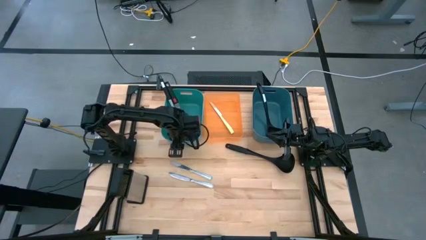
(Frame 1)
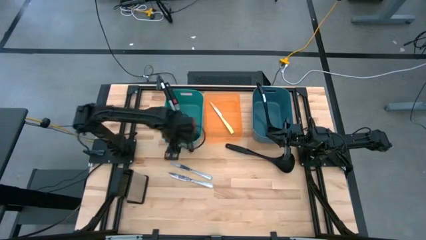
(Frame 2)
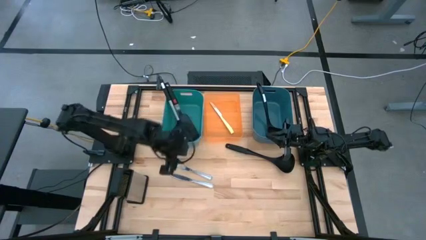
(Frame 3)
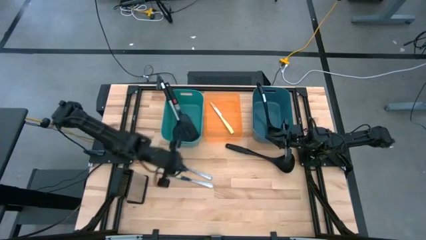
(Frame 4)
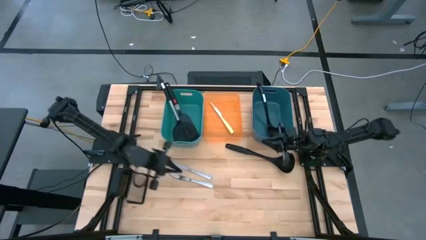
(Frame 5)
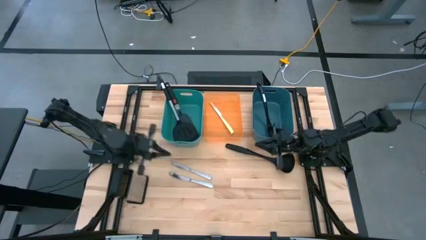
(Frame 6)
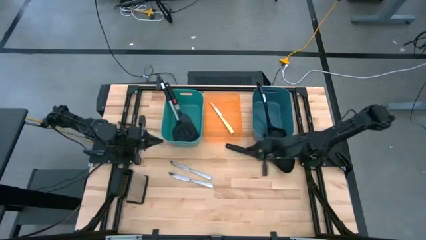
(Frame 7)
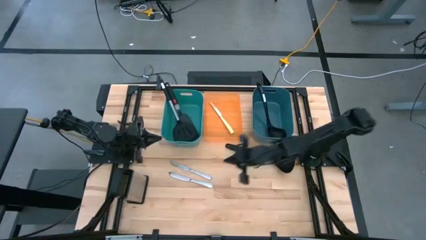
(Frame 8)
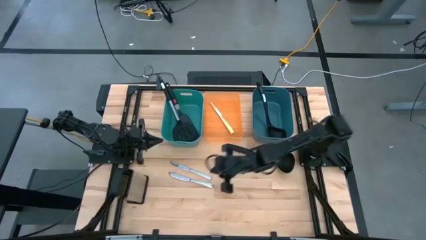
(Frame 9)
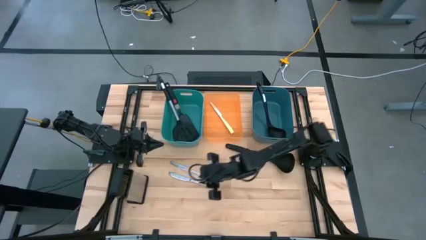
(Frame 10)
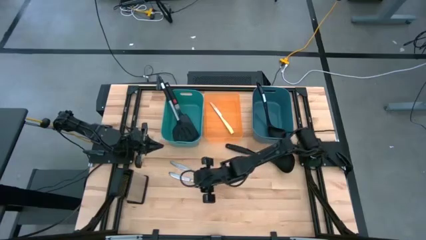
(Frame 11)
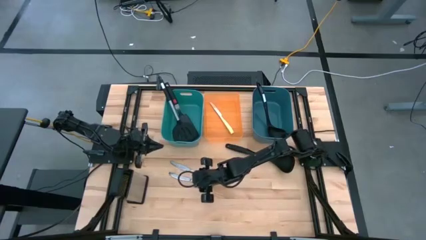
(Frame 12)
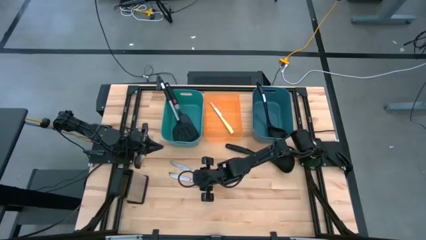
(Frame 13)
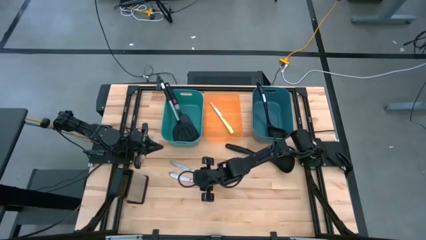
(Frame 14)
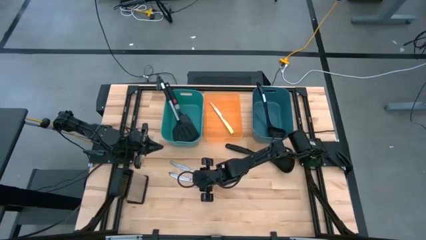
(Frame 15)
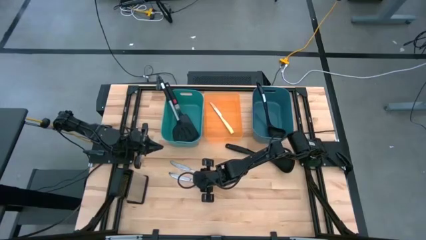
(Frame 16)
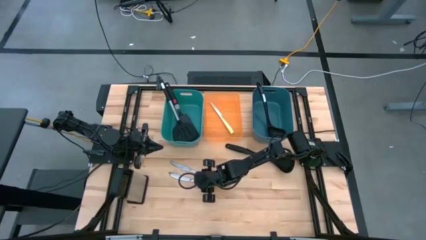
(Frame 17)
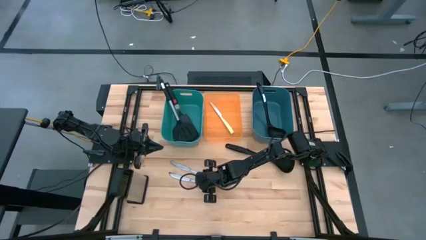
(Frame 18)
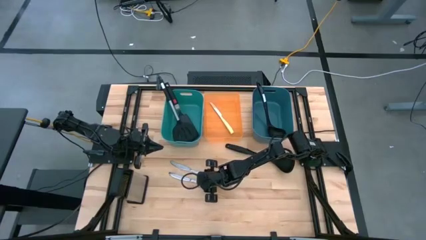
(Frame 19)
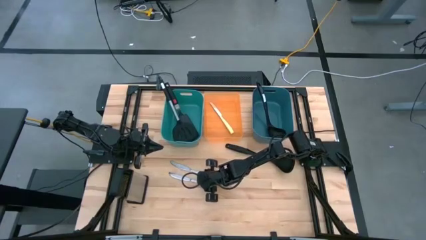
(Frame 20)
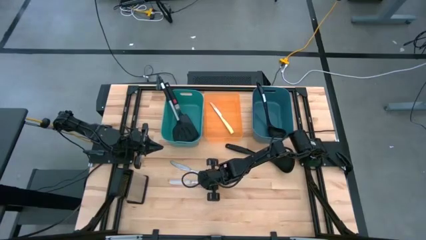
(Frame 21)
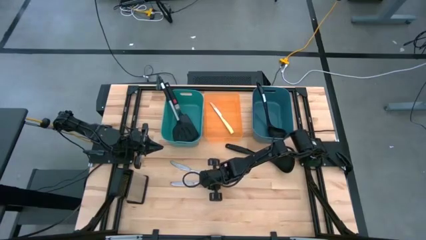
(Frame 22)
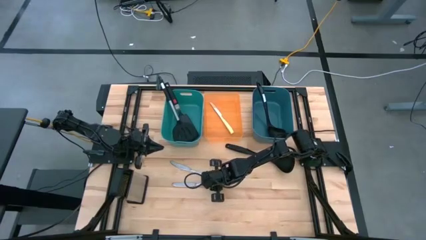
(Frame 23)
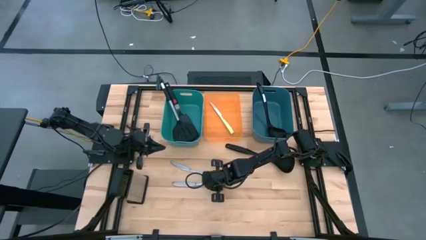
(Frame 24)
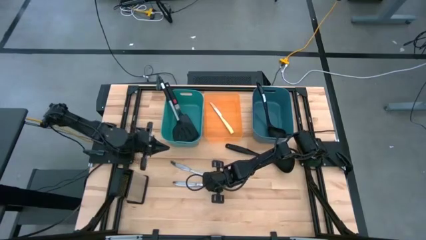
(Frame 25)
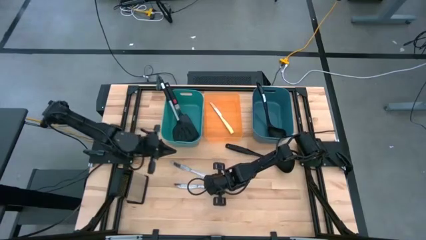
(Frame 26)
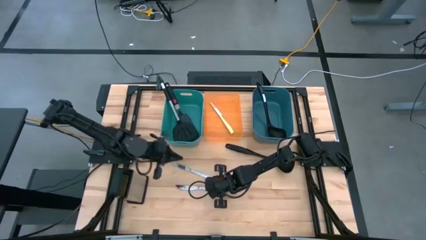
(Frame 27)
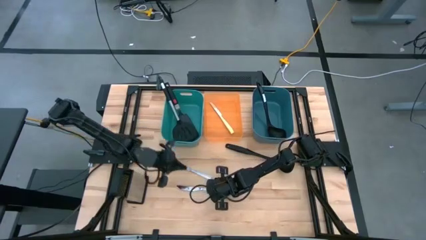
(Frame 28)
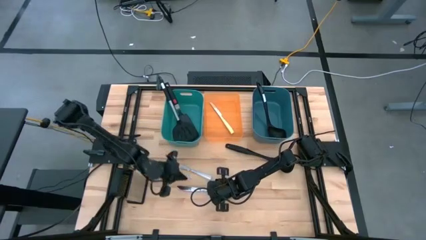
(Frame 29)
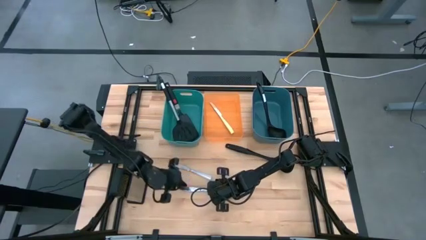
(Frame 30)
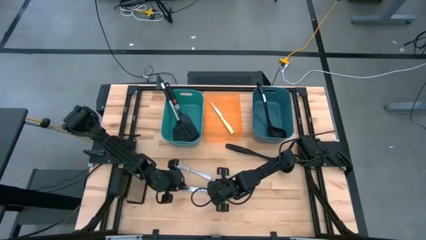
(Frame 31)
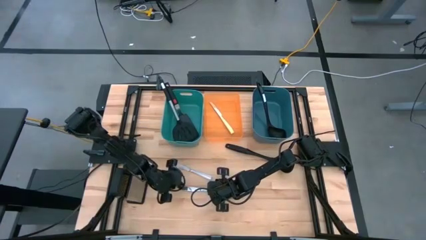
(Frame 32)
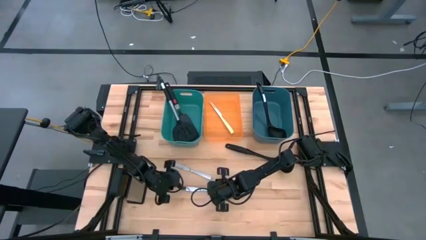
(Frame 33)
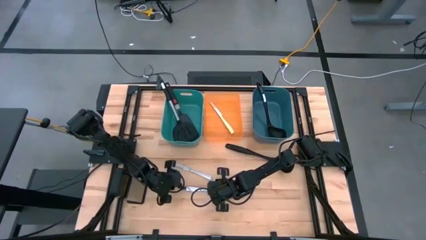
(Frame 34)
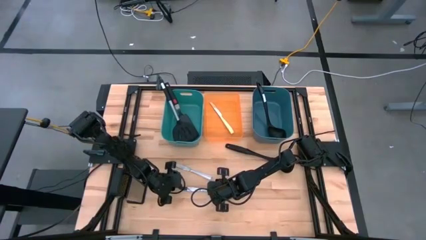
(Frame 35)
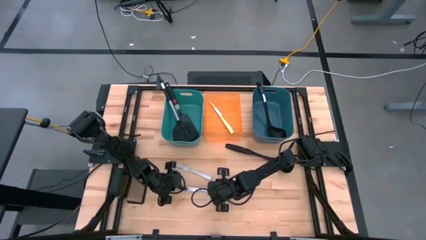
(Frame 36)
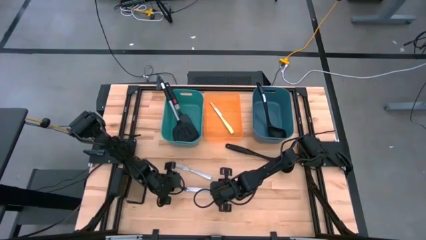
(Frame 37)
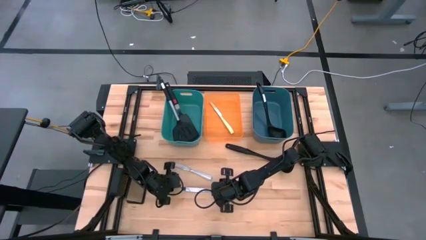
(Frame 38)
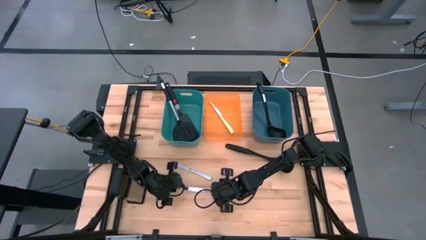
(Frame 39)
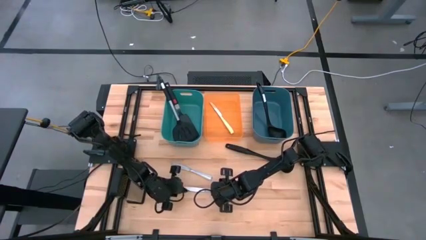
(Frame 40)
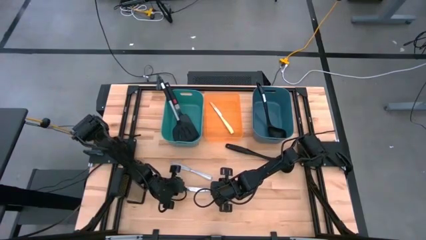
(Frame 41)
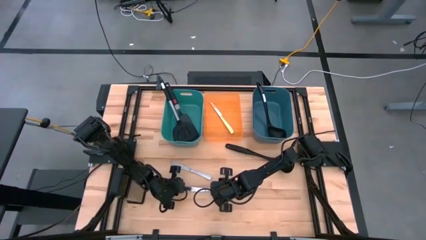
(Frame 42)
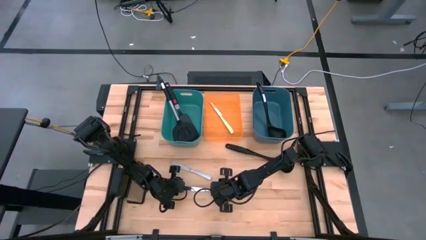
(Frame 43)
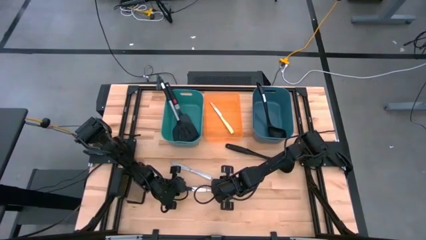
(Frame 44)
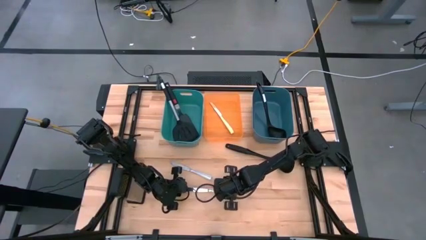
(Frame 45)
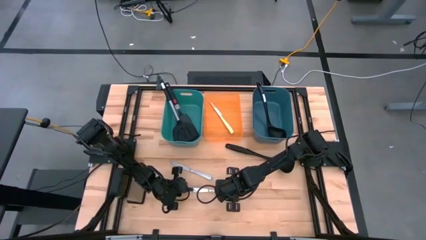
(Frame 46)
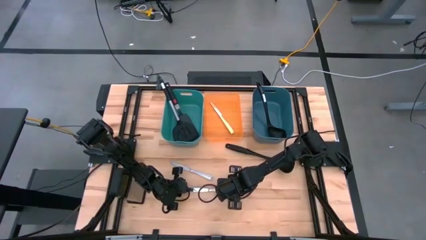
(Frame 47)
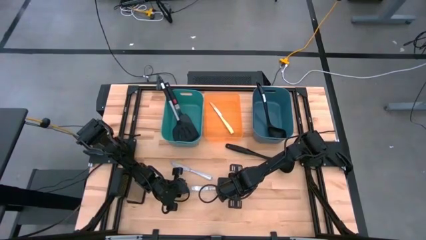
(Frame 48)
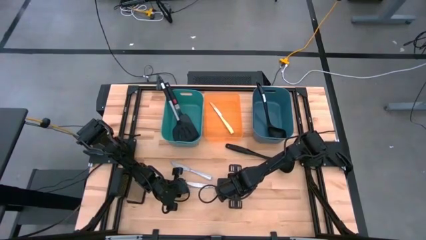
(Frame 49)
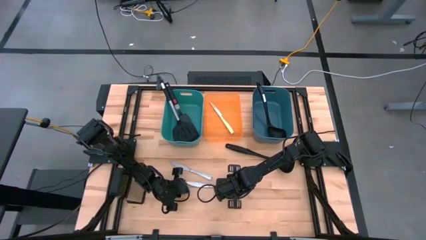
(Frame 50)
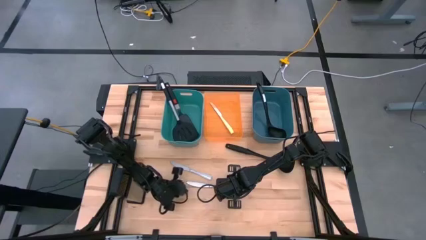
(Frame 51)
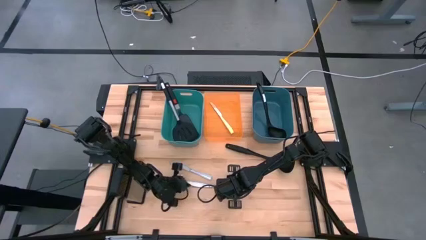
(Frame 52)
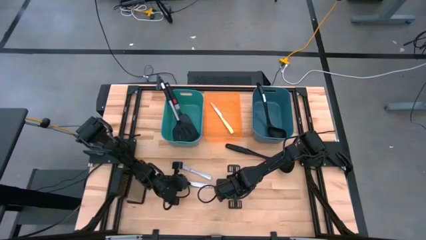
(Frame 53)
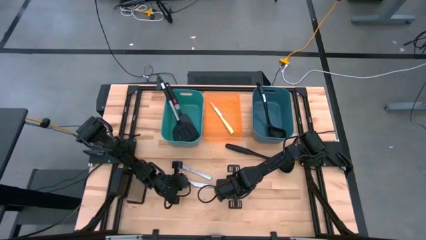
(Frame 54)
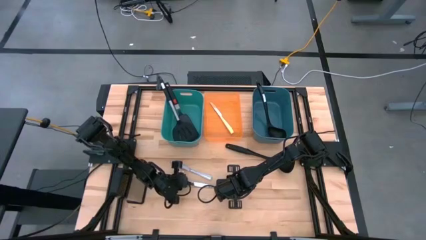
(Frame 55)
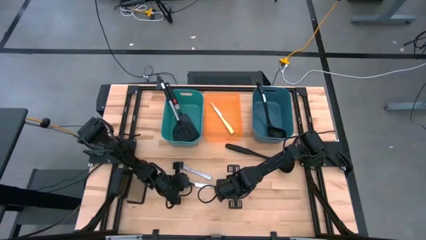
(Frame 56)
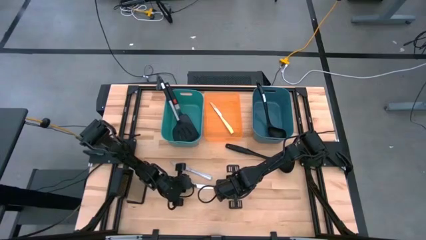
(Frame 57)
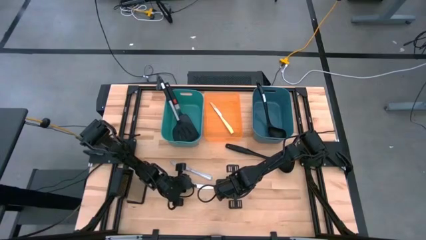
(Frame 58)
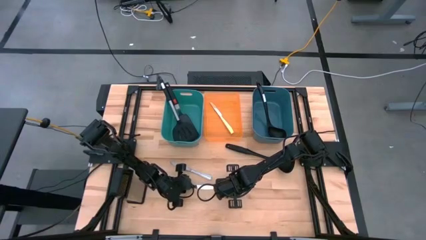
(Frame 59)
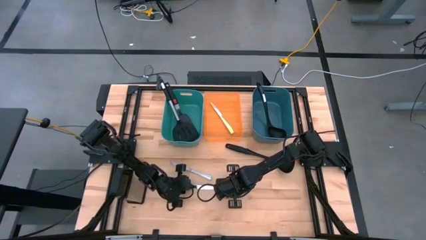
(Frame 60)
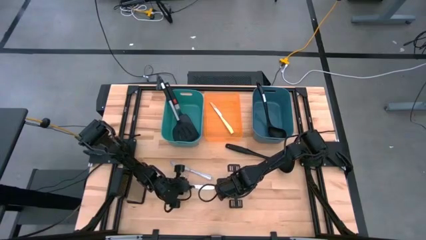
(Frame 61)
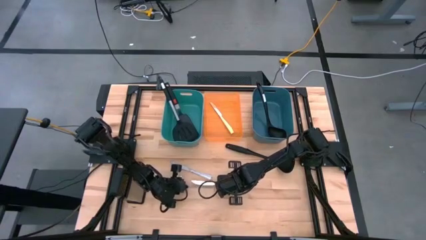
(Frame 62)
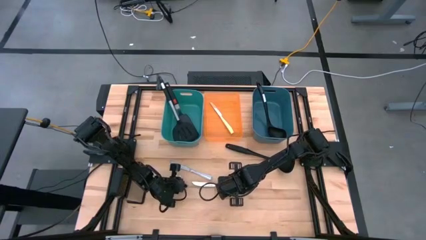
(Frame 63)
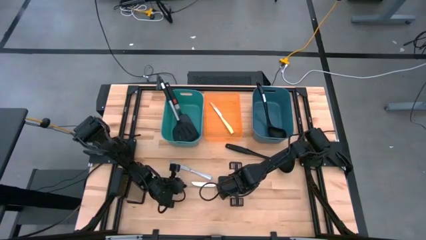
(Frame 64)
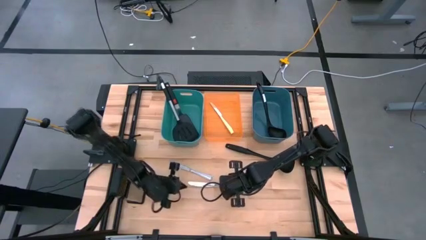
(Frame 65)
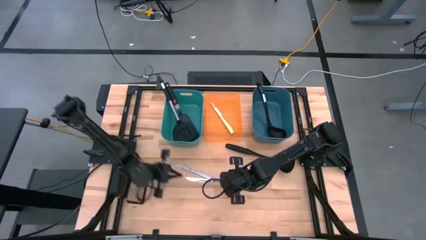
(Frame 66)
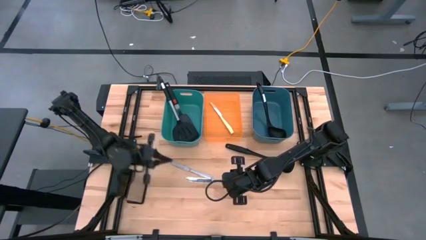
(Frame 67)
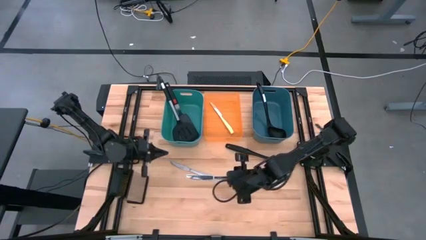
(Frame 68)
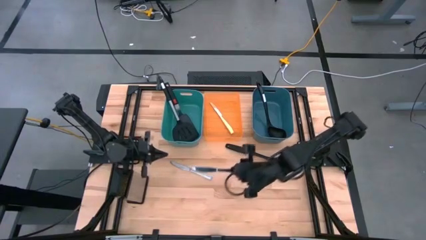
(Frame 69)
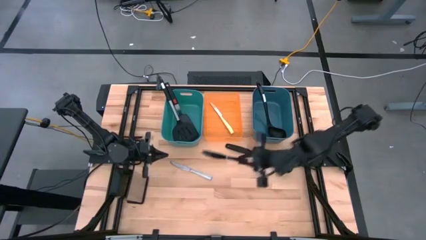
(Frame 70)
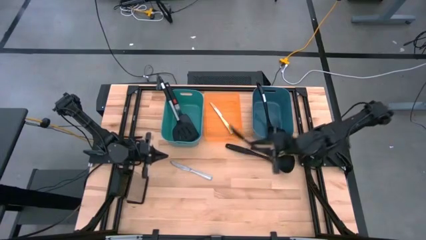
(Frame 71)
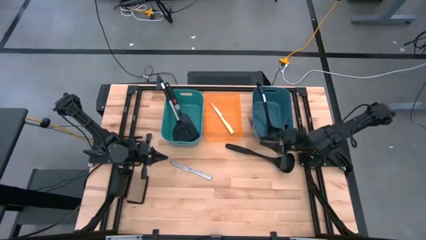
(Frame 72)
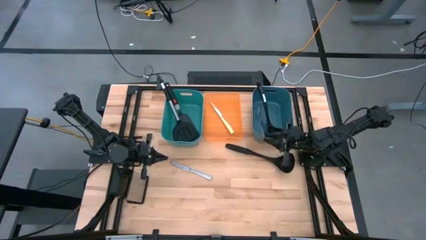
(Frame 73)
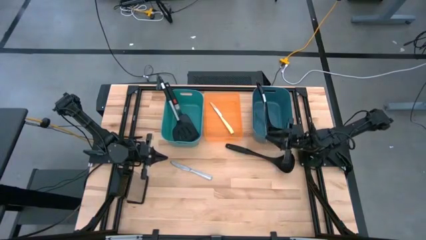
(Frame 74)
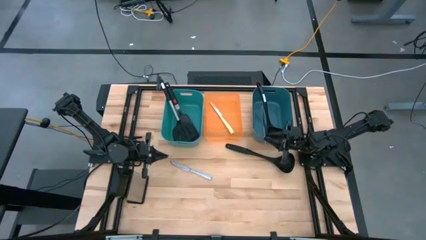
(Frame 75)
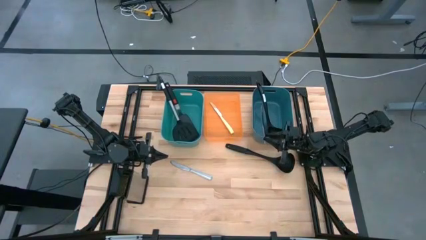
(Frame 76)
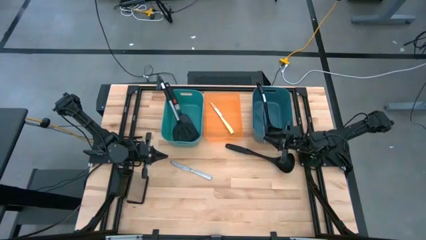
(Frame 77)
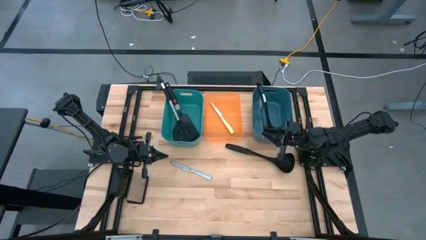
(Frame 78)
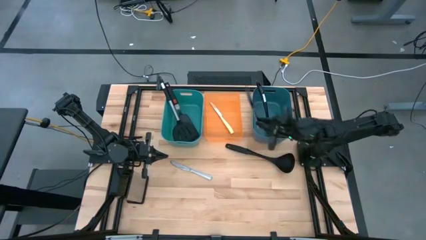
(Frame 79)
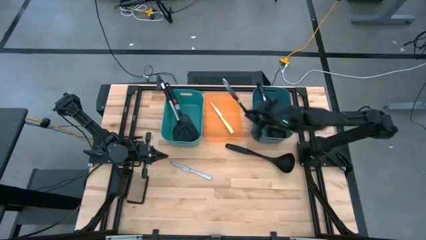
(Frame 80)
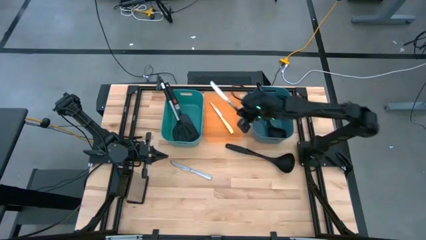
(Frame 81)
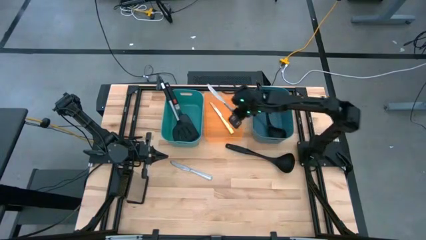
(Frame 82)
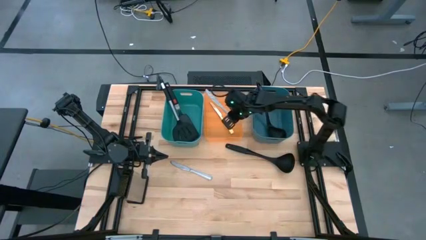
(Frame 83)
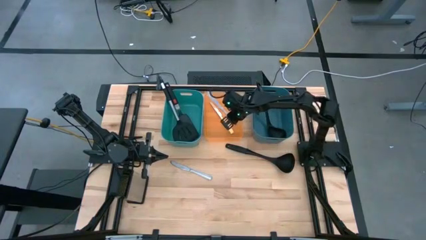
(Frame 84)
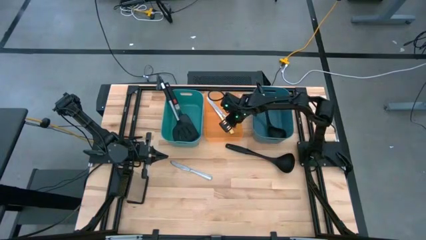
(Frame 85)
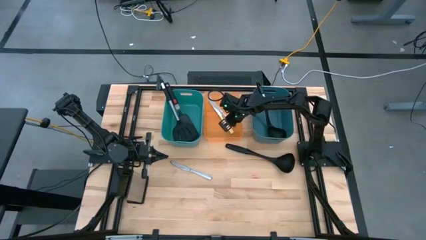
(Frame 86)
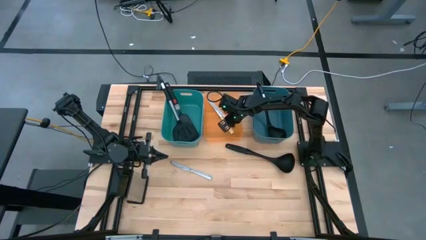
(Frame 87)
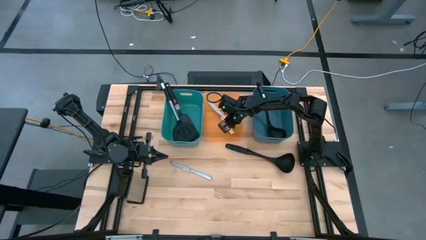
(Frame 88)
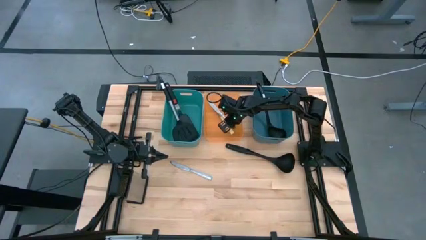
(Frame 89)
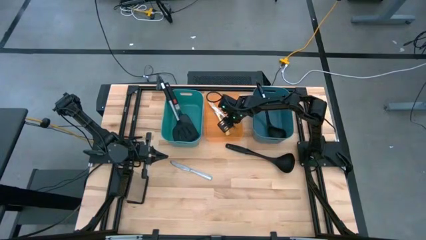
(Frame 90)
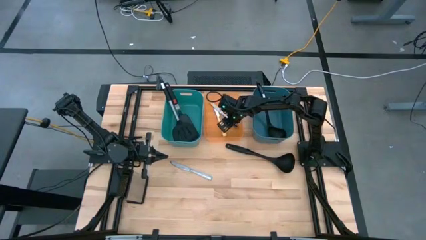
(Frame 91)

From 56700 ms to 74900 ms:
Task: Pick & Place Kitchen Items
Put the bottom silver knife into the orange bin
